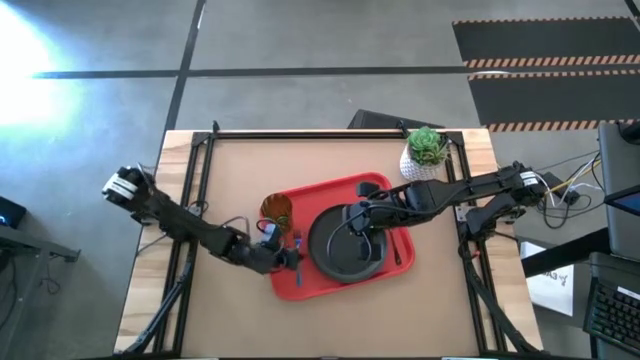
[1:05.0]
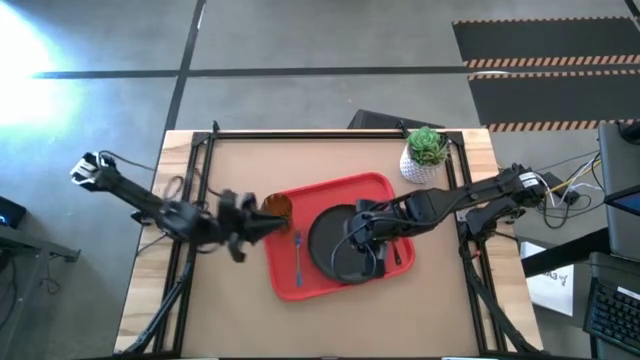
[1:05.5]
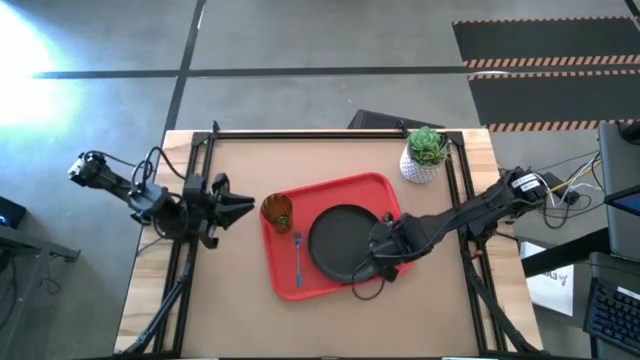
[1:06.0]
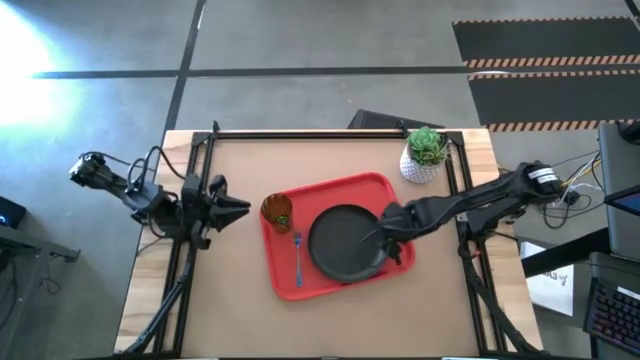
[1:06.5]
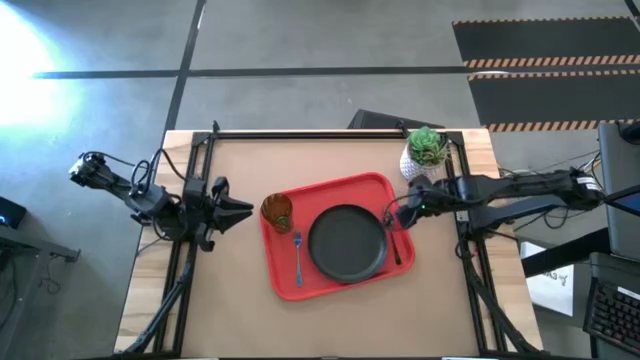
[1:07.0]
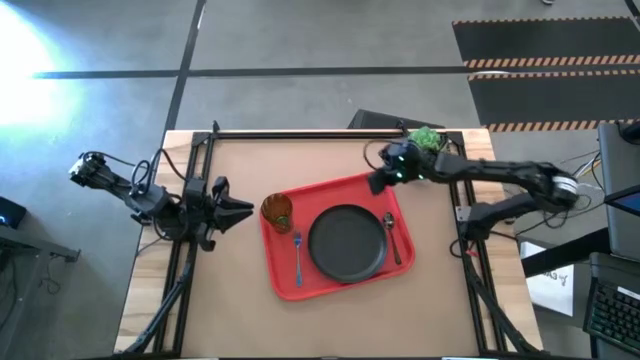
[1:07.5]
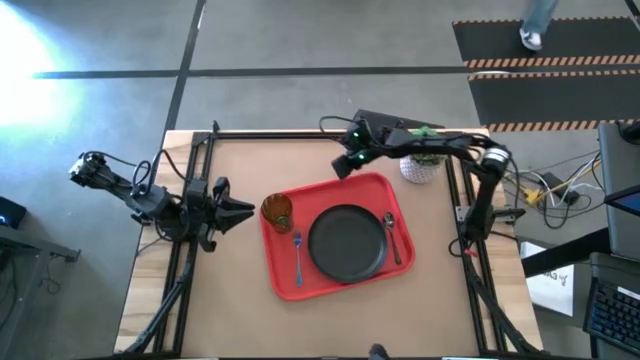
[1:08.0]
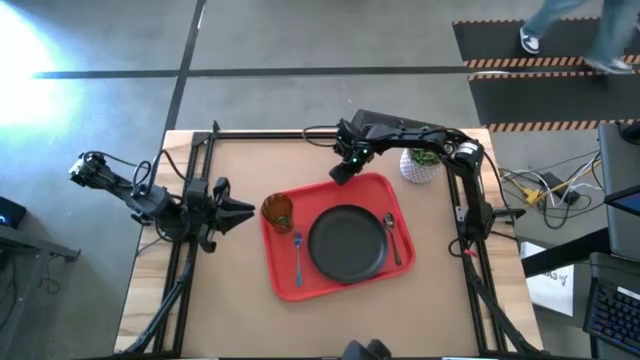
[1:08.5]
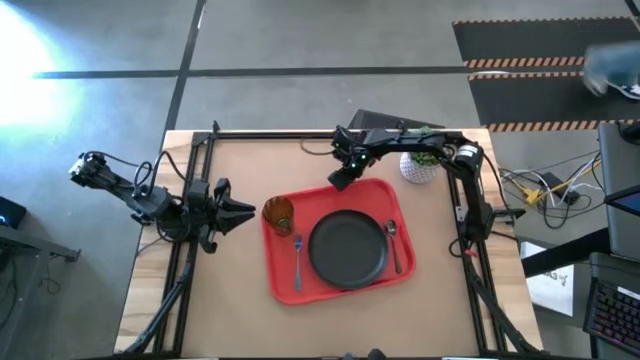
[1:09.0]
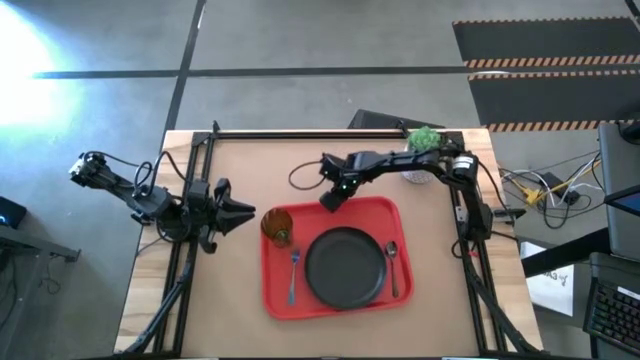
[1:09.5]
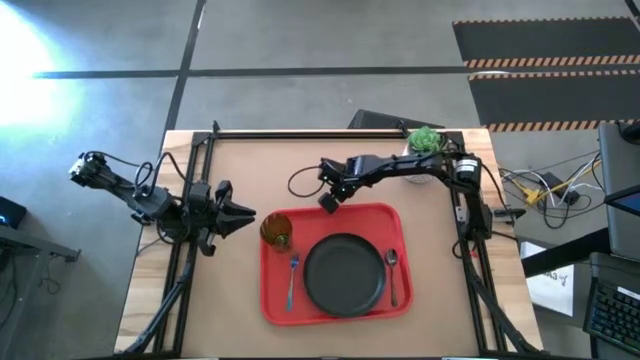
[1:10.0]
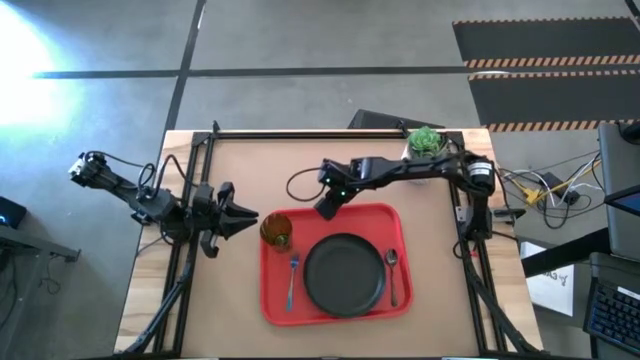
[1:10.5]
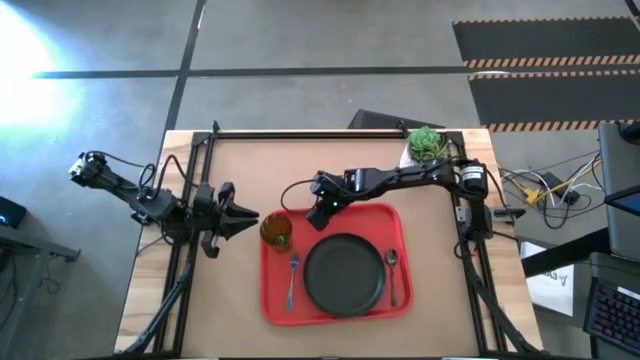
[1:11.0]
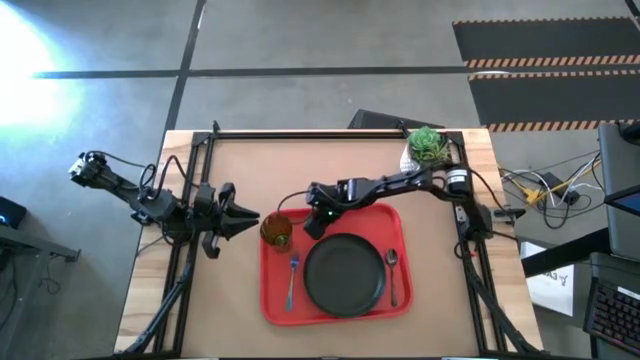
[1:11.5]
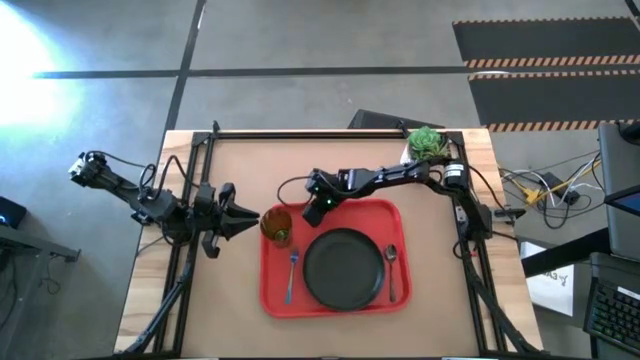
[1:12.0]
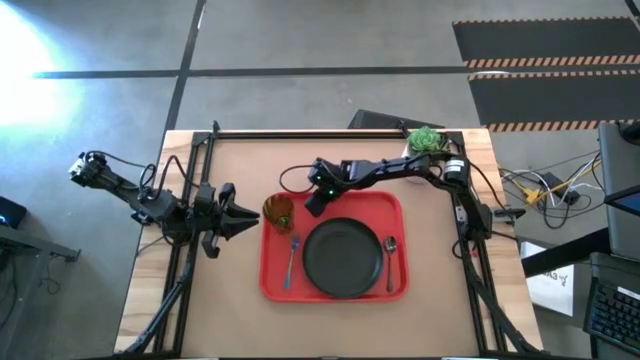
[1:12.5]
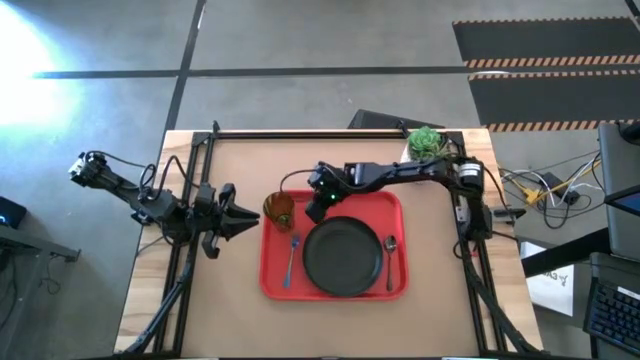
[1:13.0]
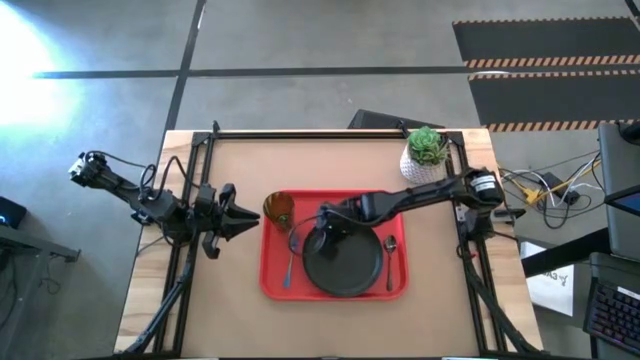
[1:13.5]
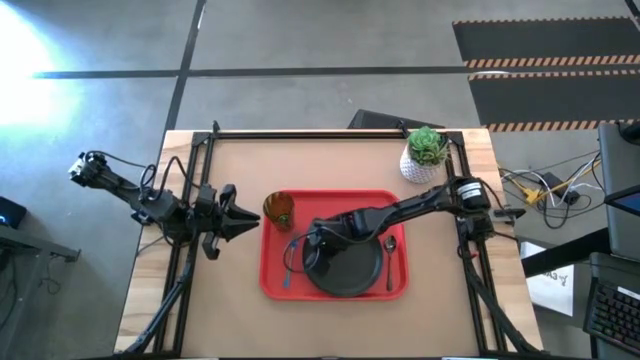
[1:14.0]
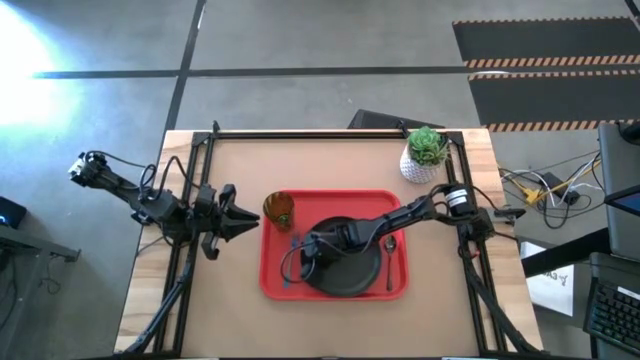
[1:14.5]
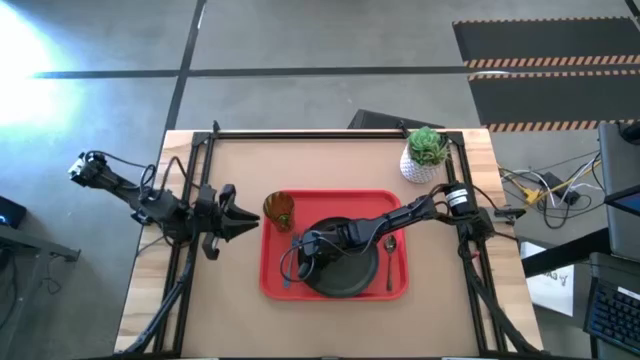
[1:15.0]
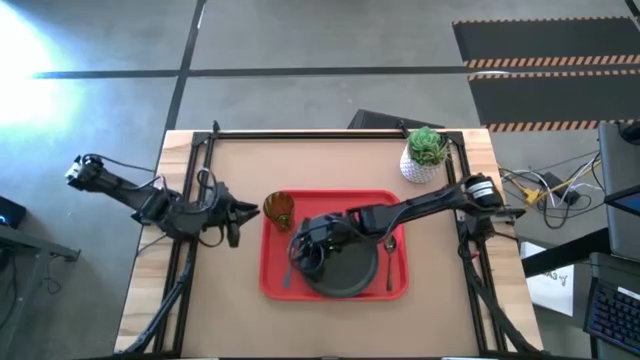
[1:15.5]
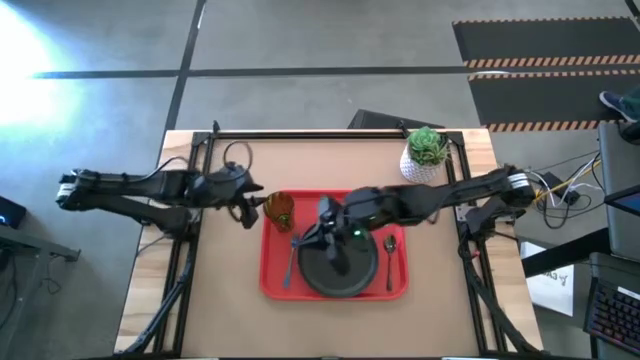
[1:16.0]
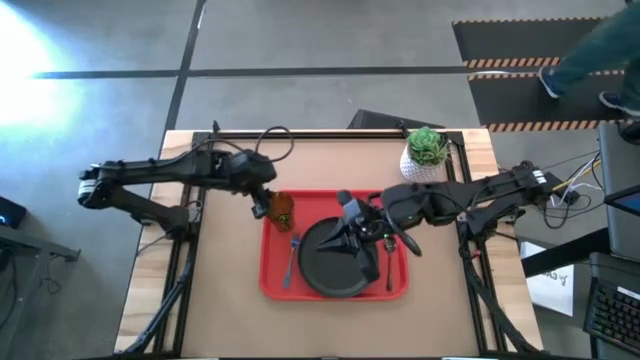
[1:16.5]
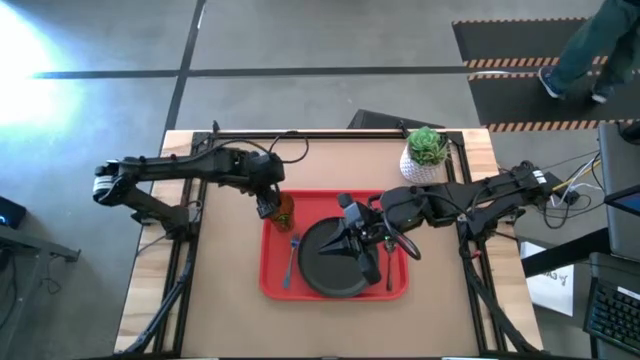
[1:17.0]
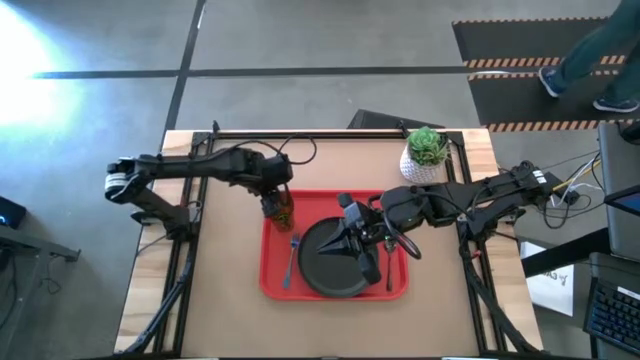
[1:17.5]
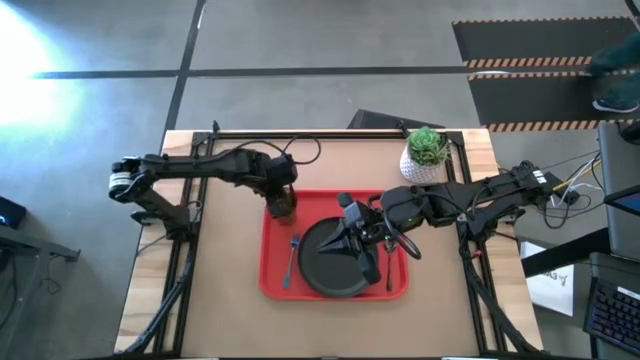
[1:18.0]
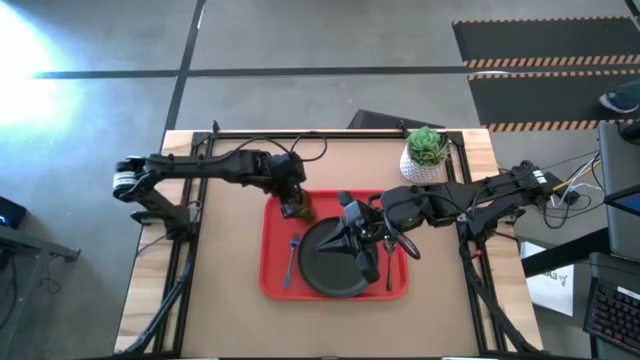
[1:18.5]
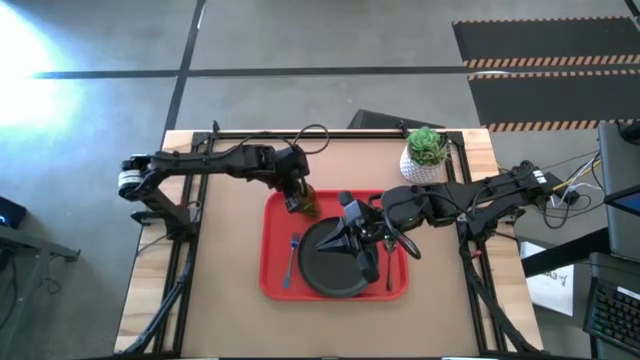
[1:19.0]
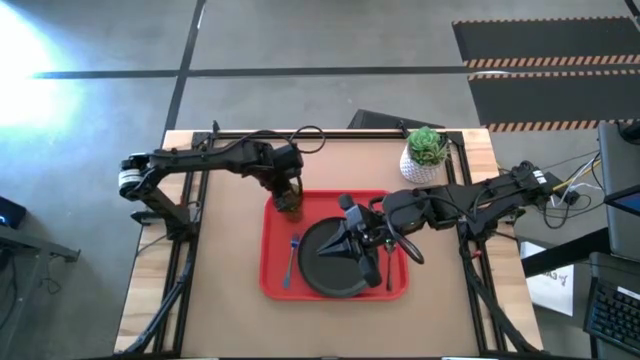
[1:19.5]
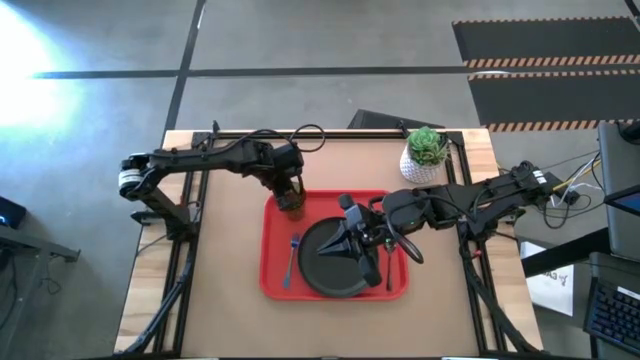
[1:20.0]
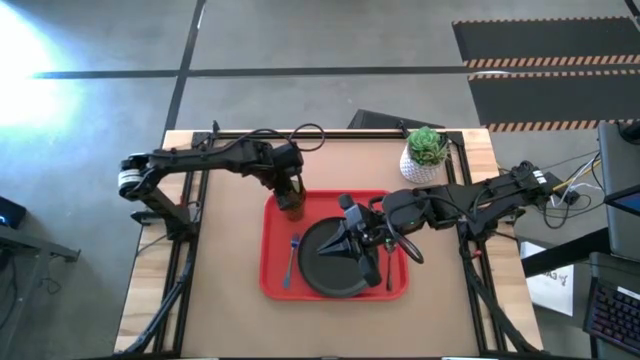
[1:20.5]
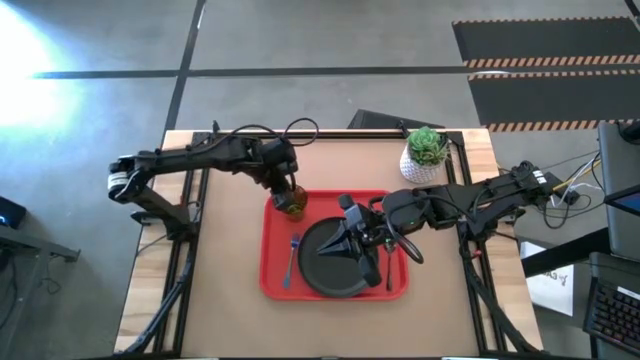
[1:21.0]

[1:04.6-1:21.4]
Task: Pick and place plate/cup/fork/spoon on tray
Adjust the set up tray

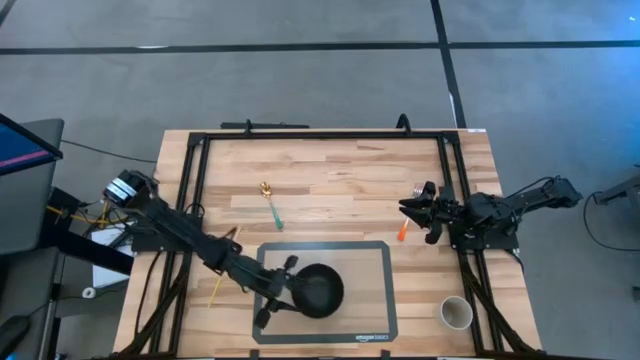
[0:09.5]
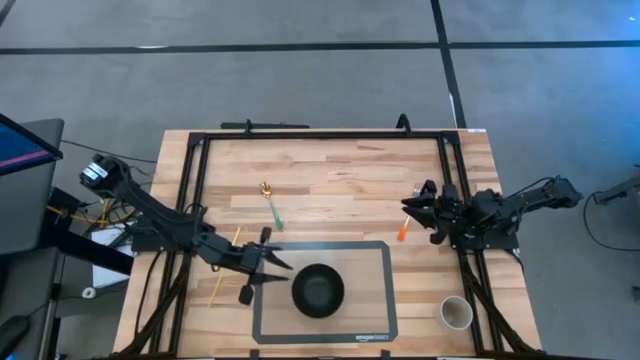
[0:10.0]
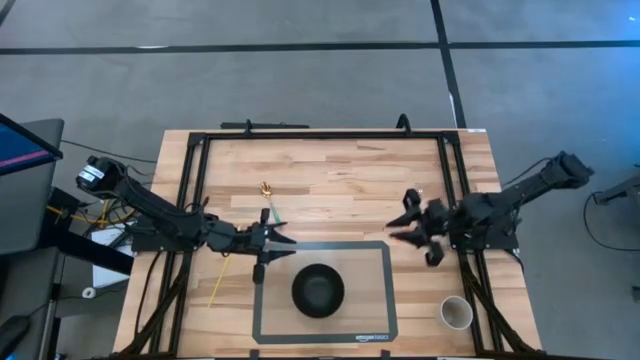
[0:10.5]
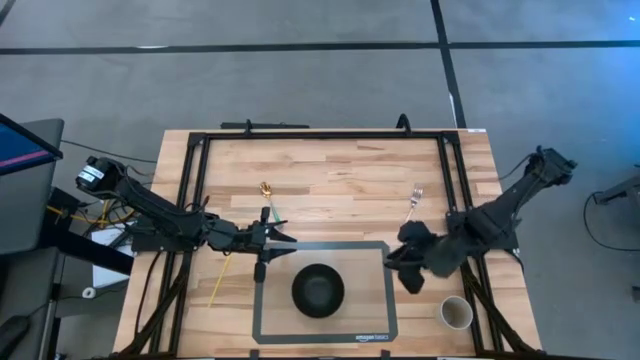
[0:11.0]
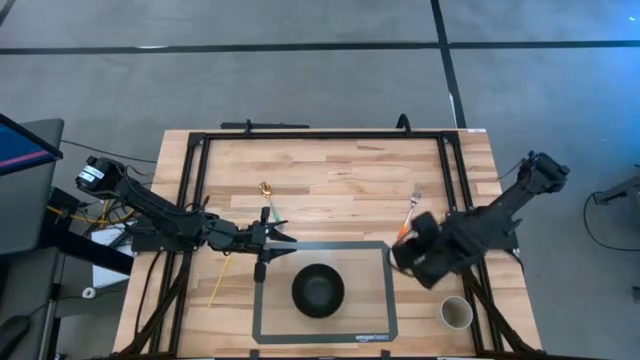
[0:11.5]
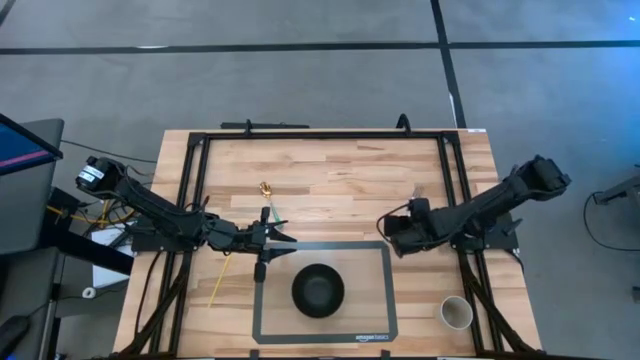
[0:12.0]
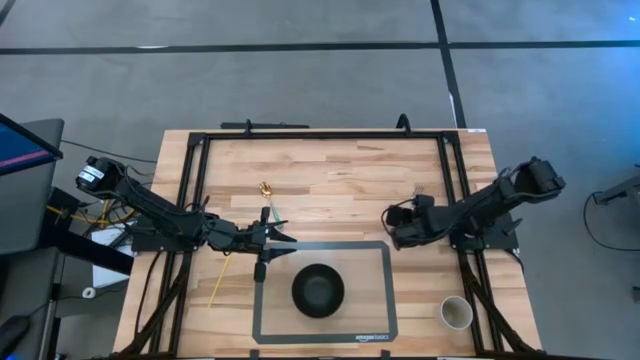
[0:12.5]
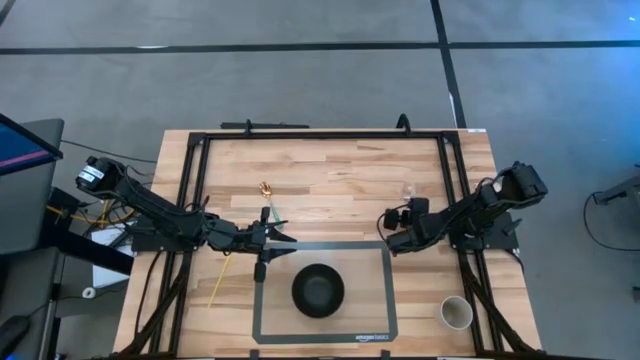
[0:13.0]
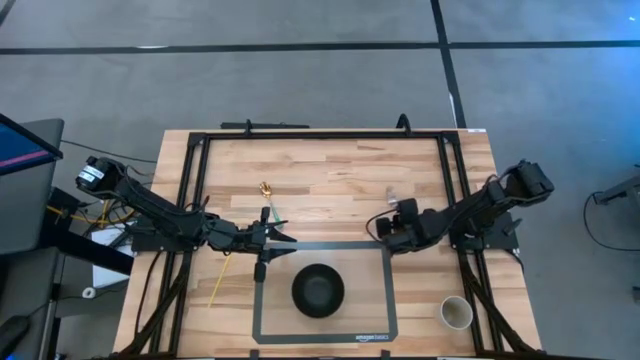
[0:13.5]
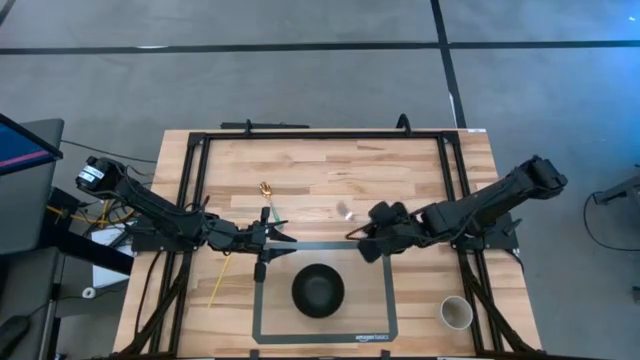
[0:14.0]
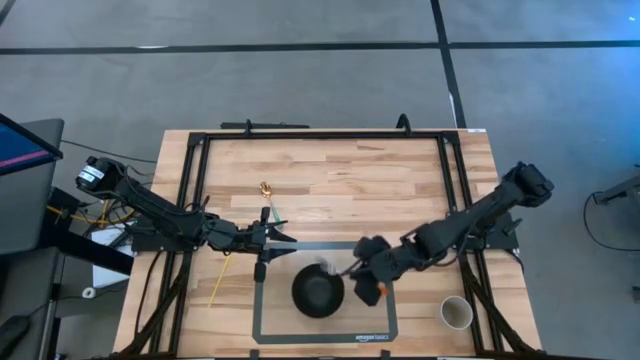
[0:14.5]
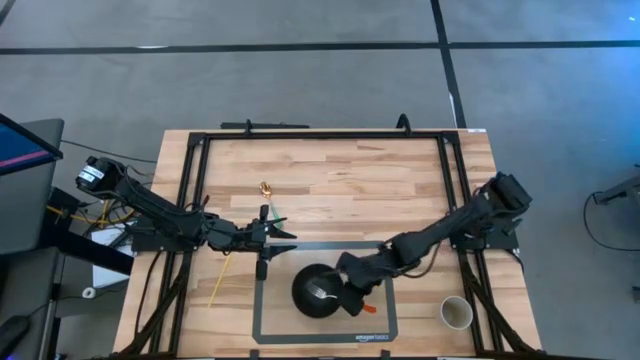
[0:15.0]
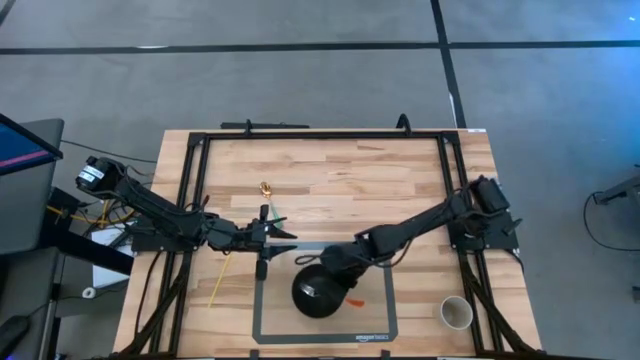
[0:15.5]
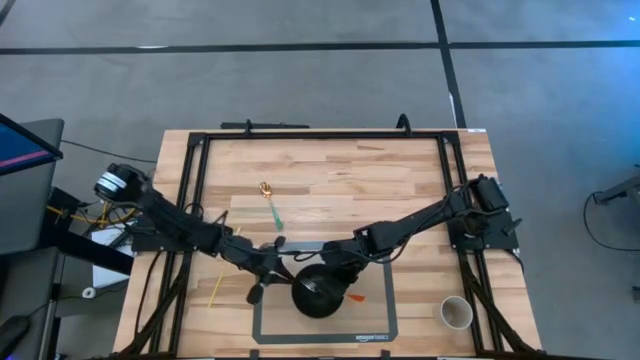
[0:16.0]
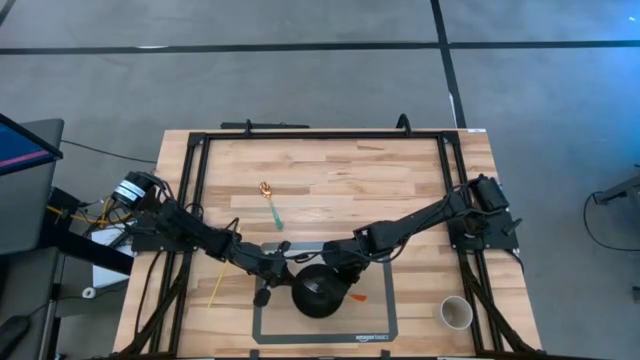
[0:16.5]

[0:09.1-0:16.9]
Task: Pick & Place Utensil
Put the orange fork into the black bowl
